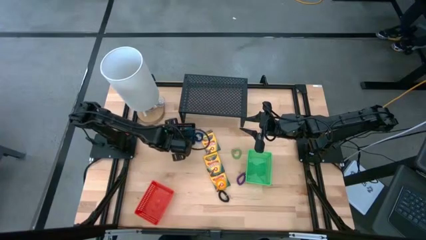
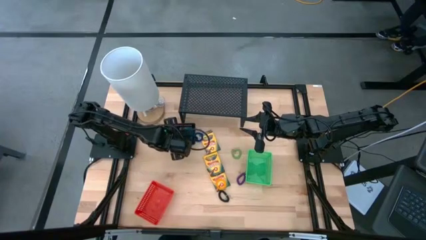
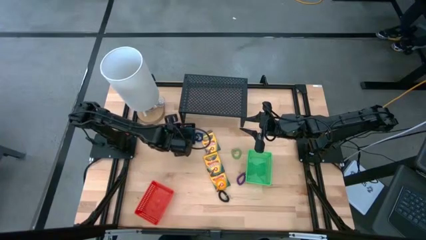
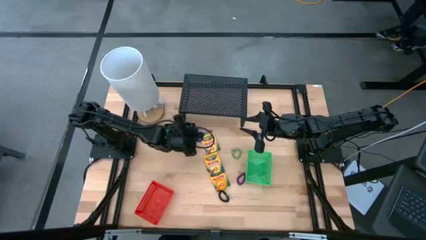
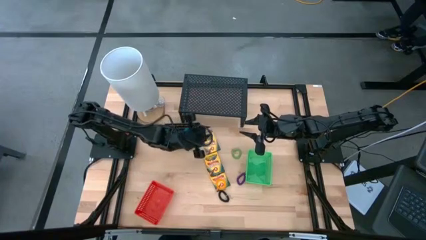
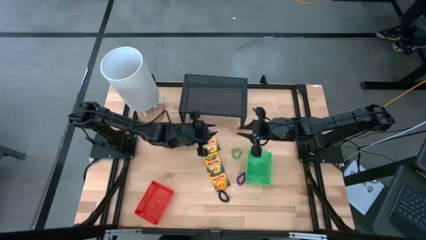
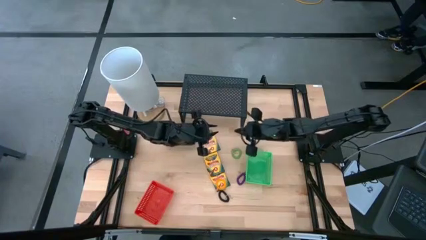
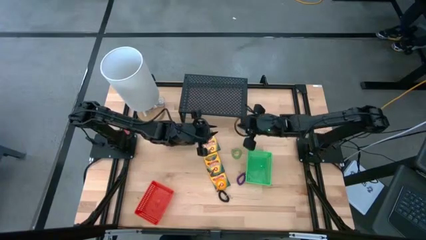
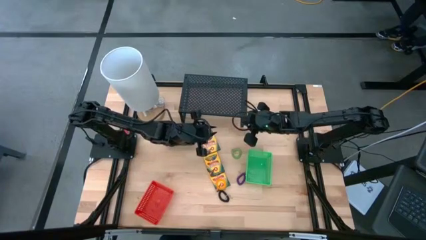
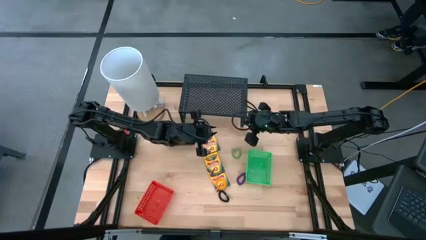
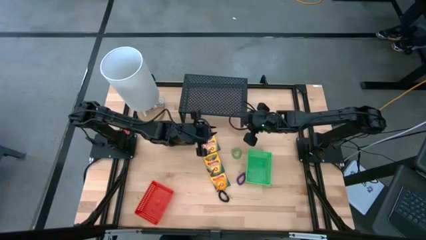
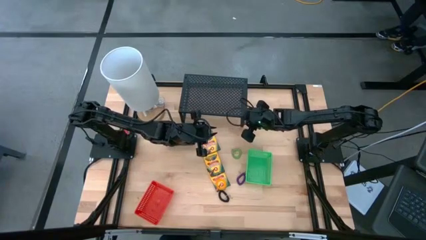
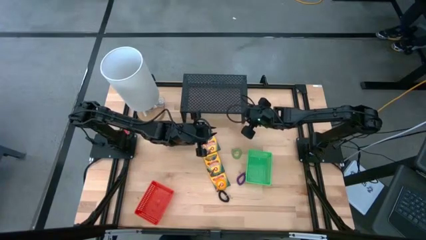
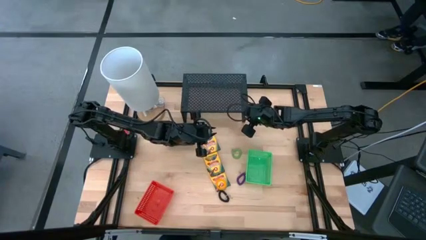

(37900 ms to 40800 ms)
Task: Pick & Place Office Desk Supplies
Adjust the shelf

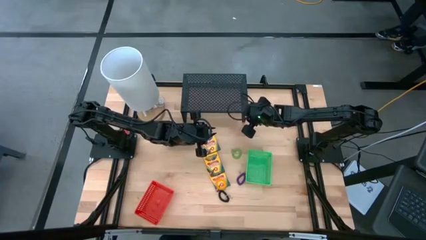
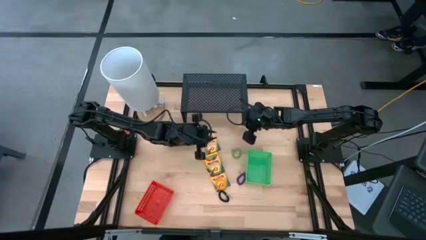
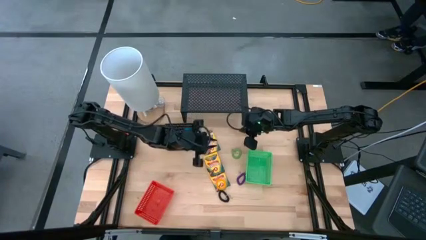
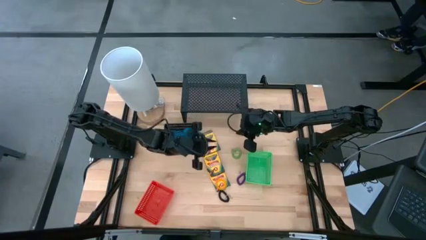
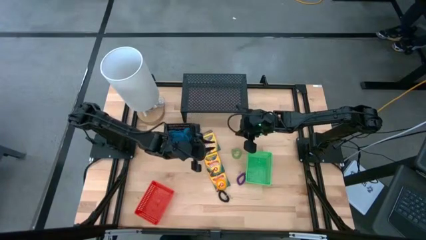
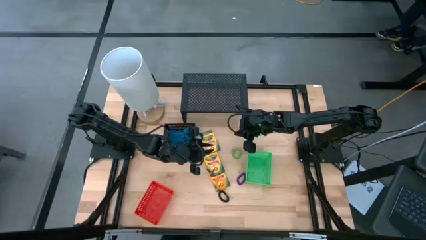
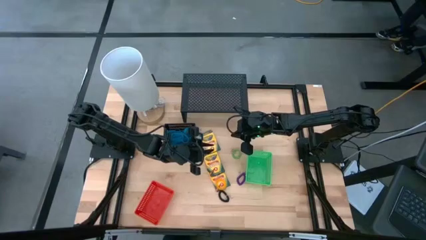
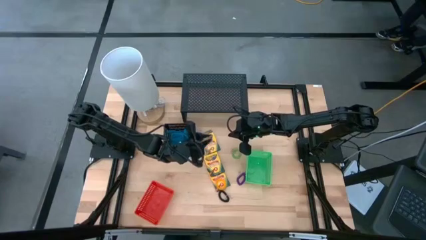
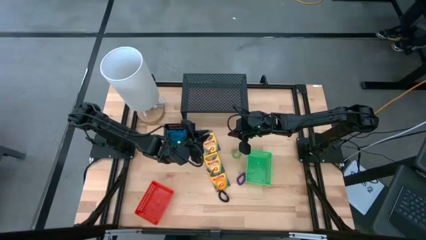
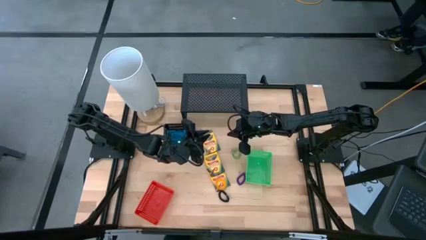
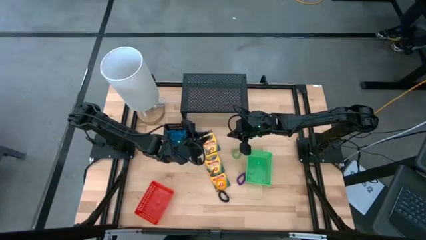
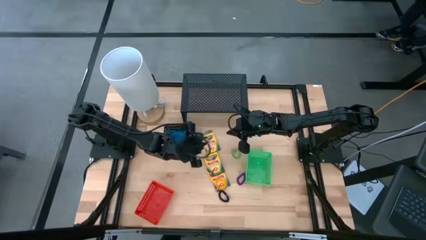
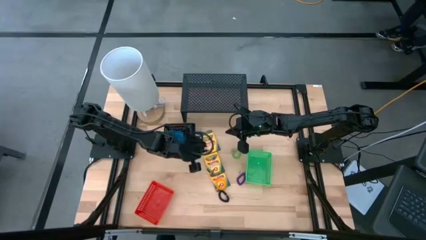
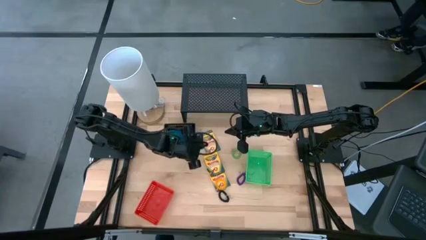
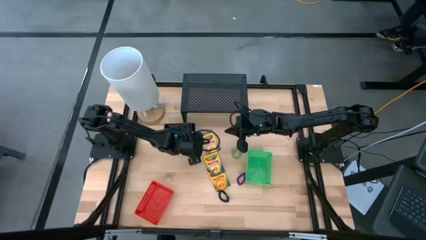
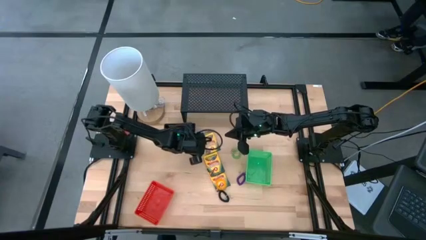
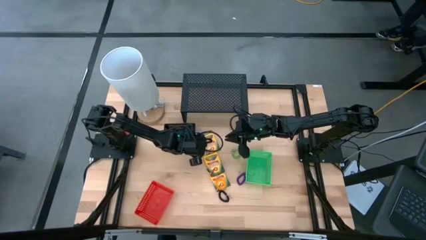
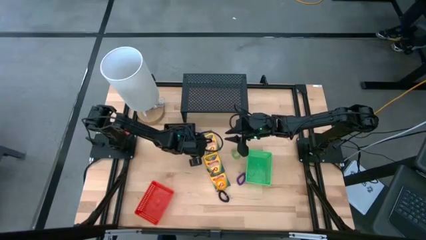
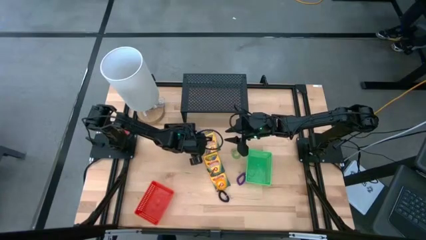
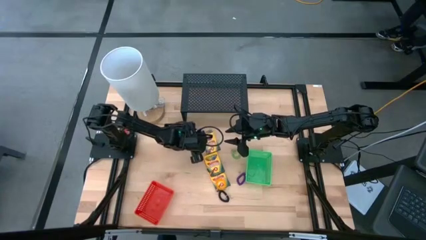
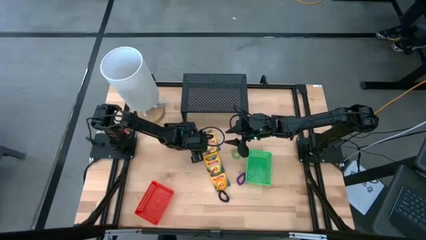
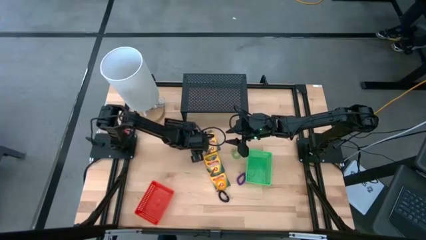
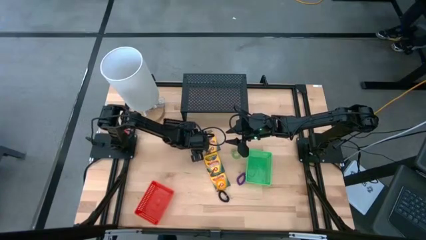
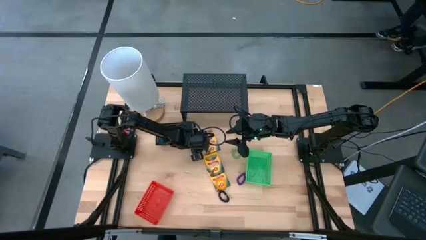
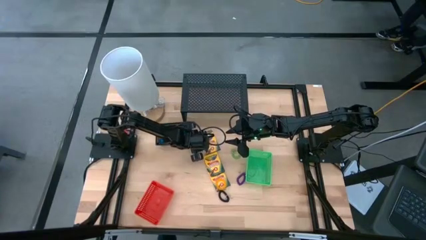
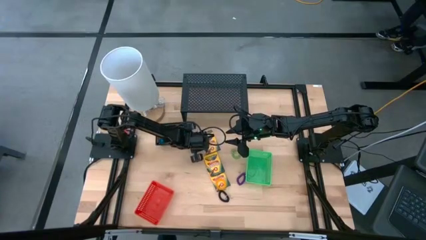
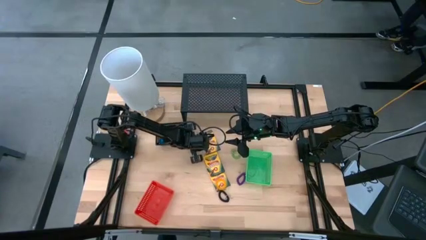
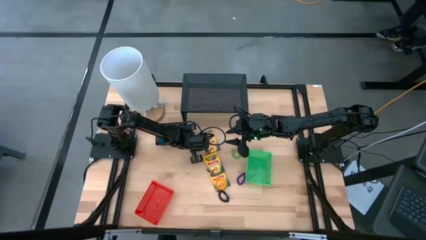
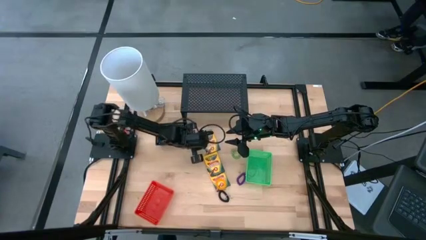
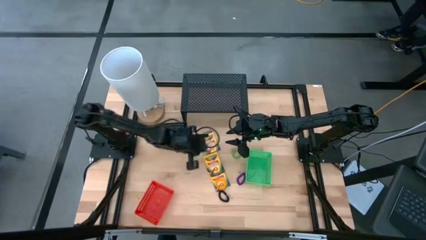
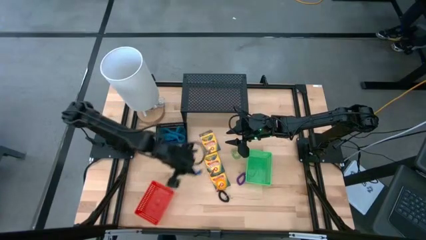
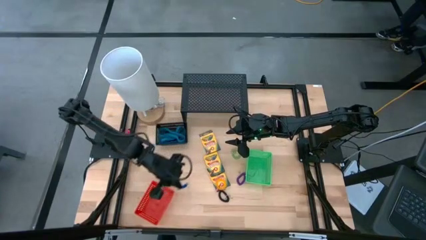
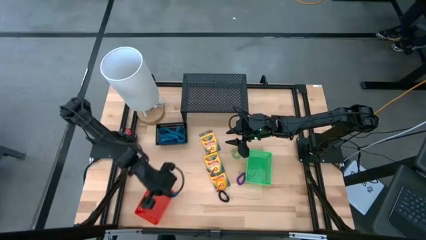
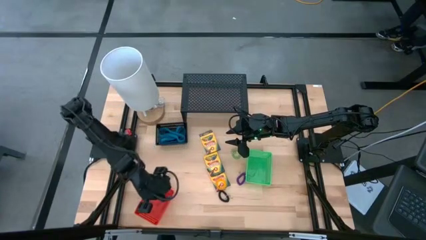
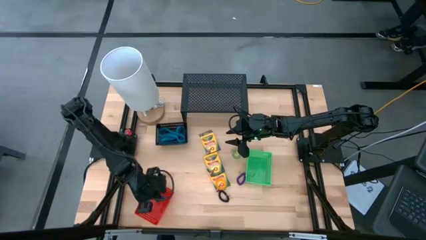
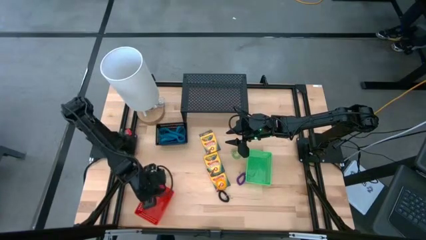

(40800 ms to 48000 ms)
Put the blue spring keychain into the red bin

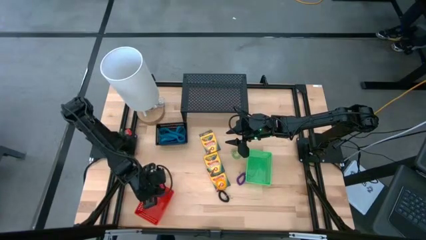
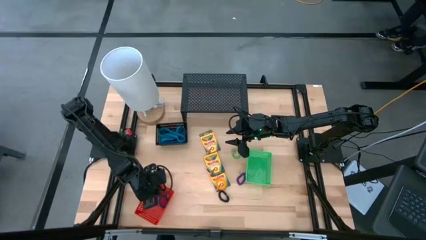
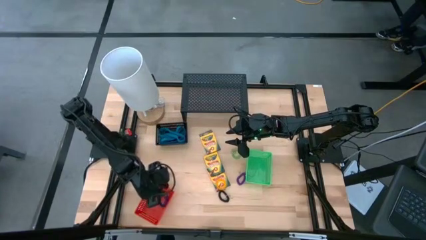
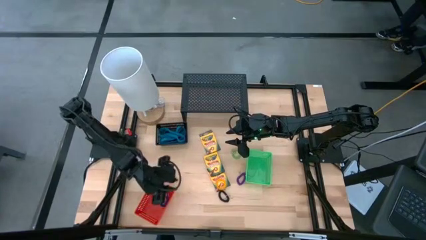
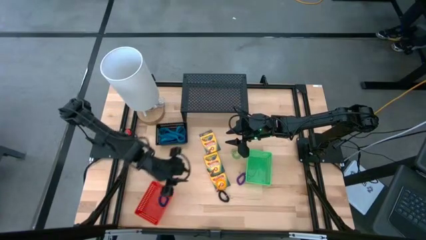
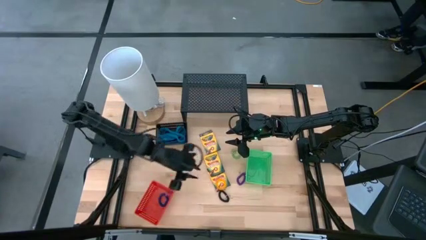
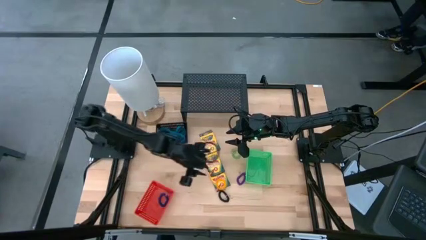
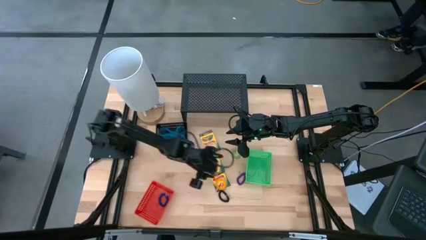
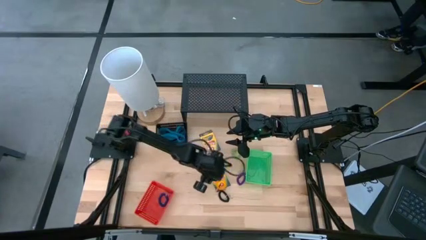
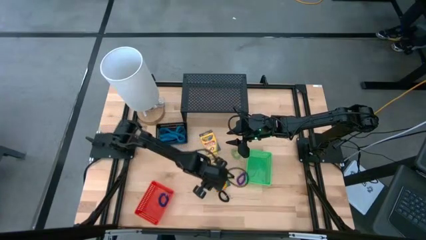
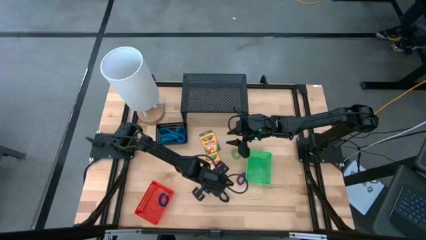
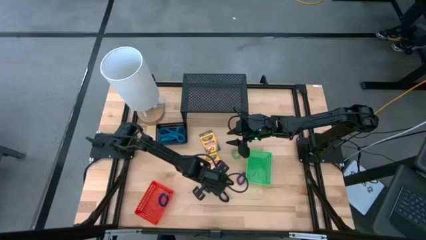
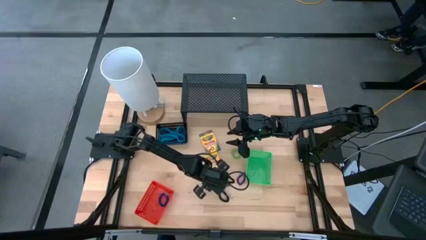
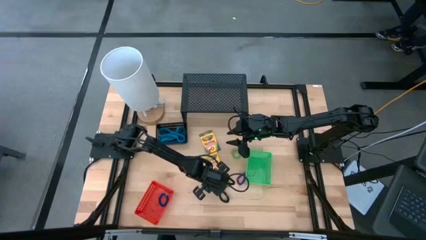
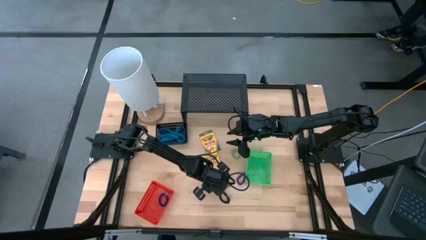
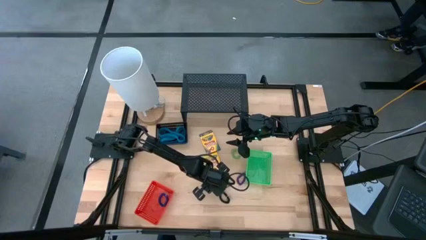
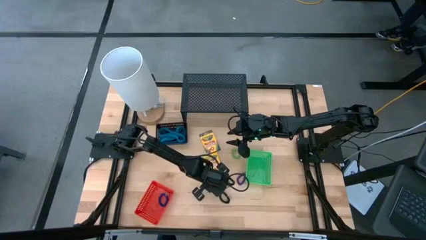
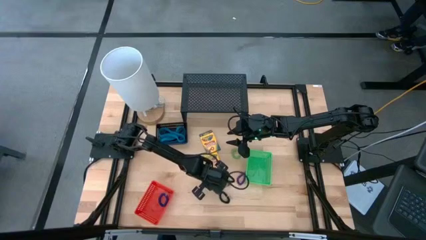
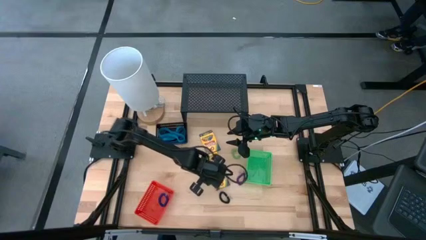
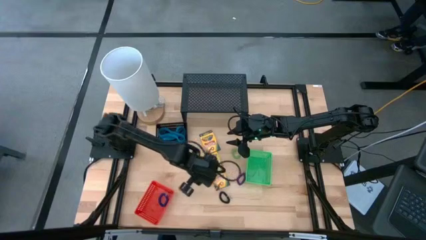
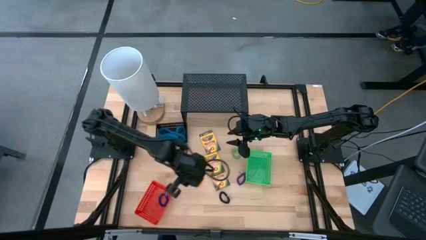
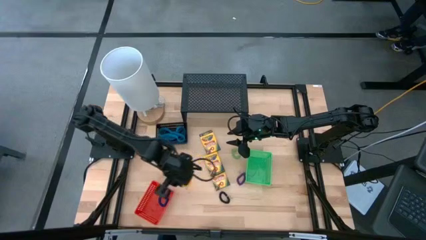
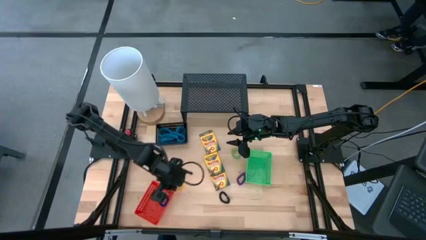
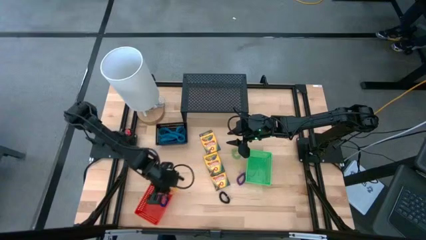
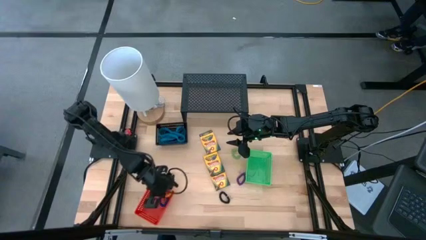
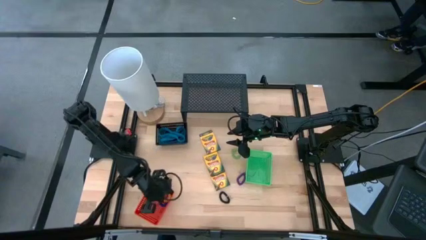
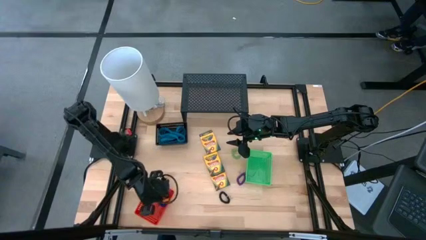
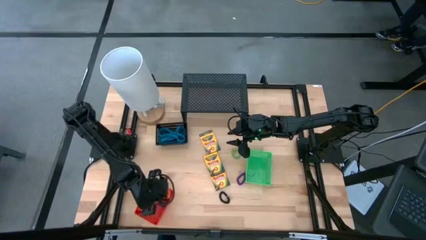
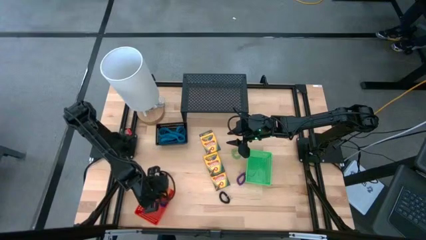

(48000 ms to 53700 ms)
Put the yellow spring keychain into the red bin

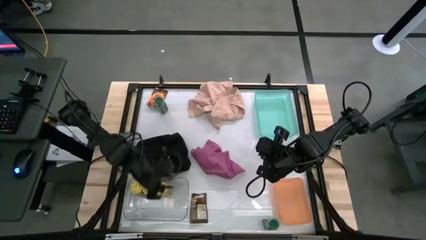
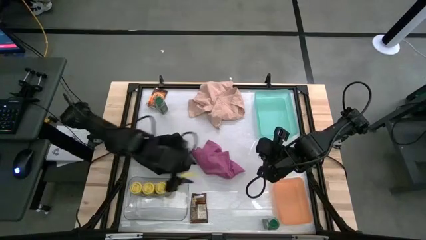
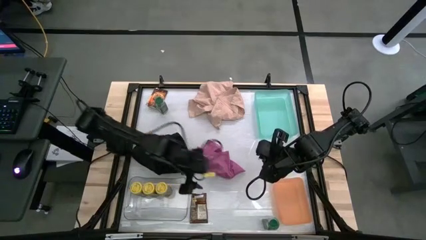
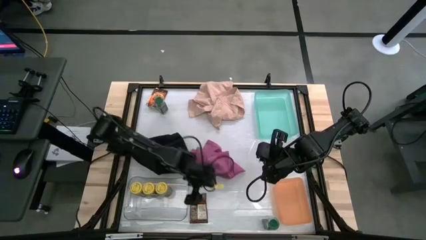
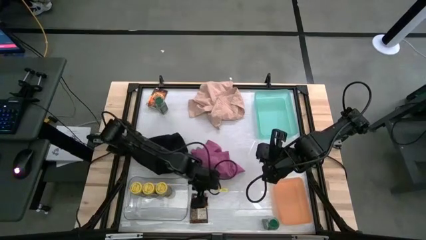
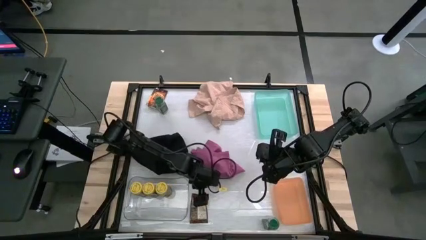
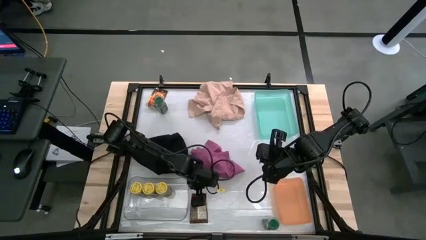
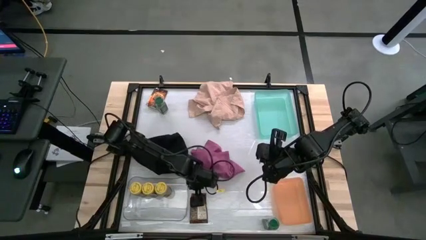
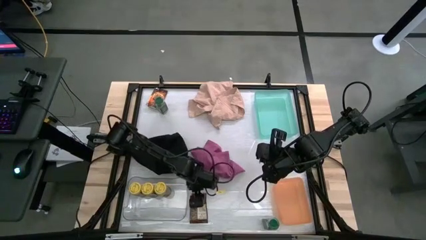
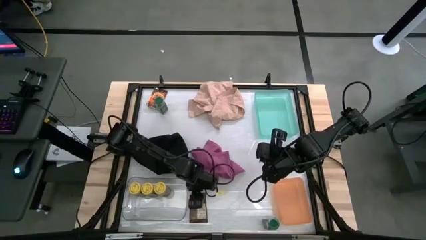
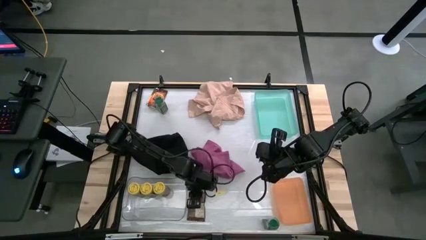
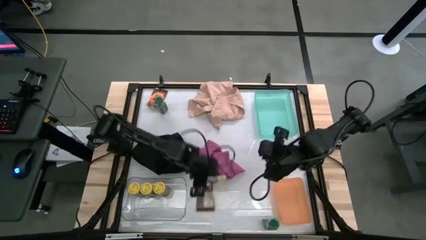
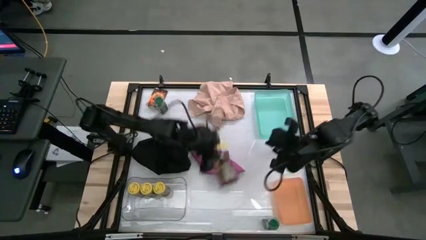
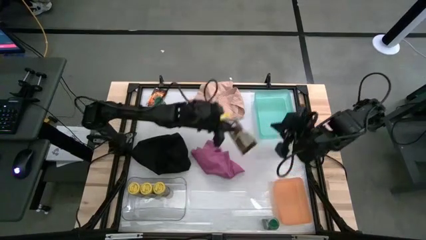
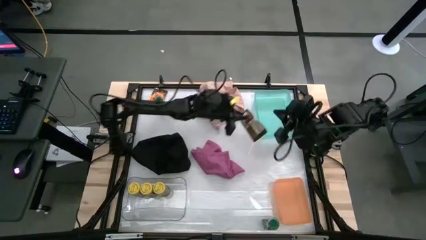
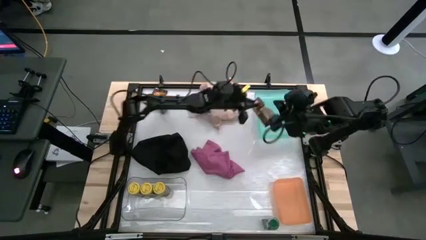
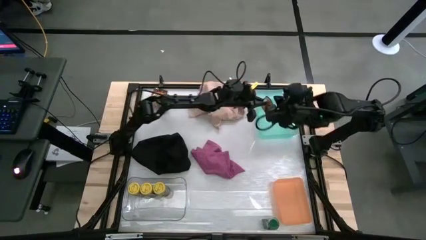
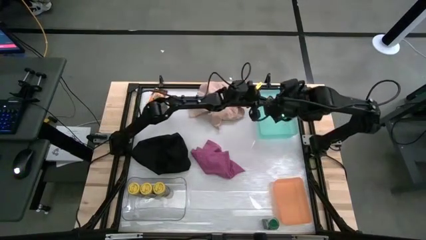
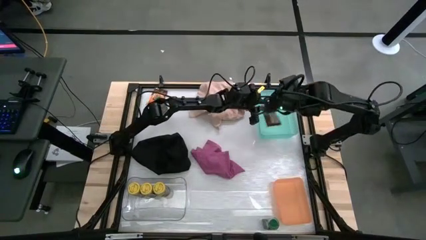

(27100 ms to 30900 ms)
Task: Sort spices by type
Put the bottom orange seasoning pack into the green bin
